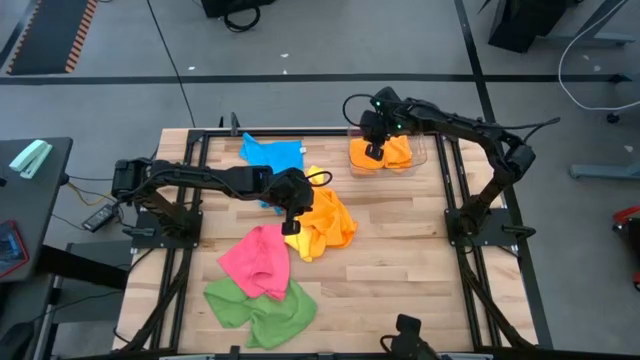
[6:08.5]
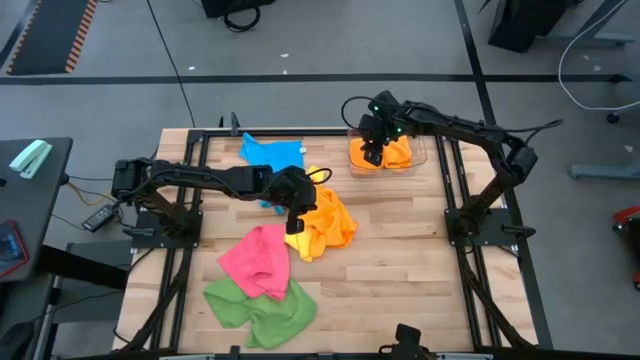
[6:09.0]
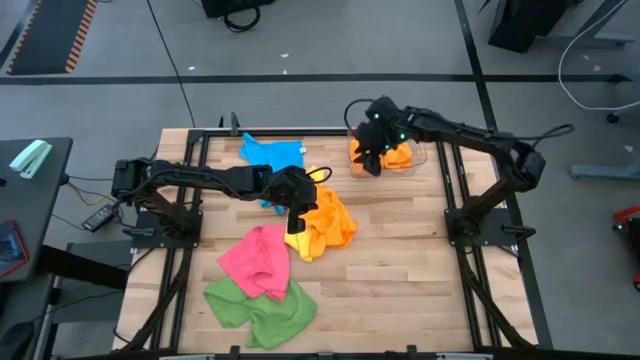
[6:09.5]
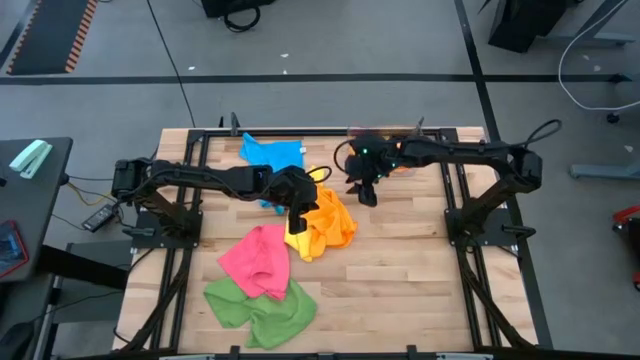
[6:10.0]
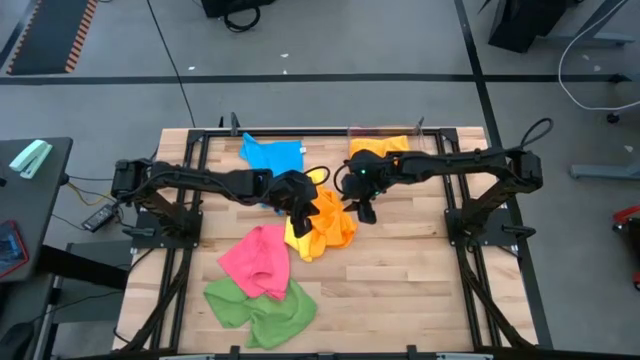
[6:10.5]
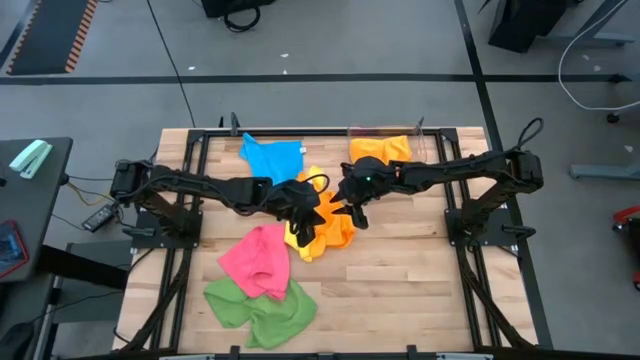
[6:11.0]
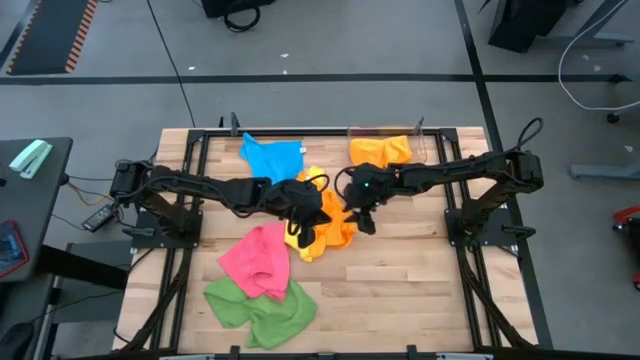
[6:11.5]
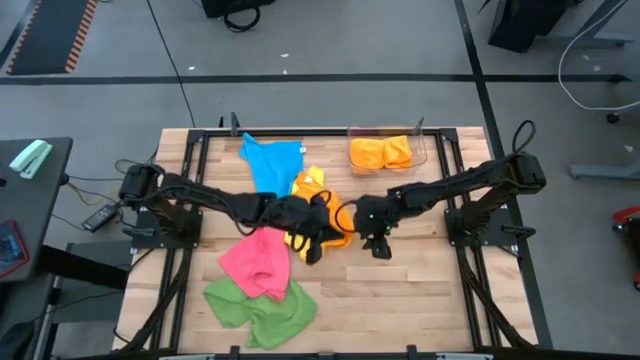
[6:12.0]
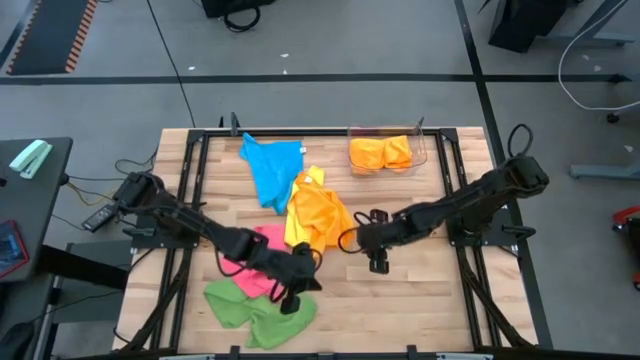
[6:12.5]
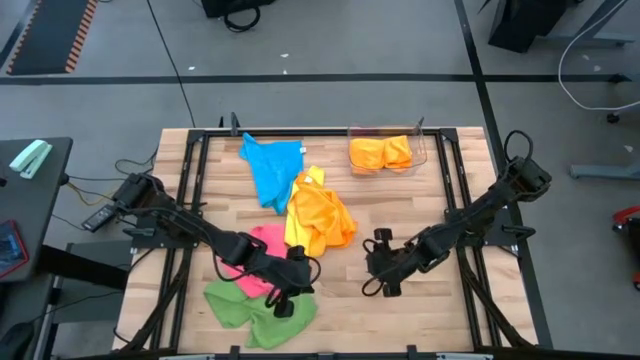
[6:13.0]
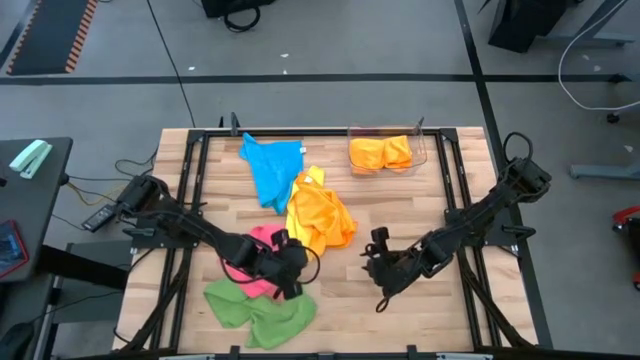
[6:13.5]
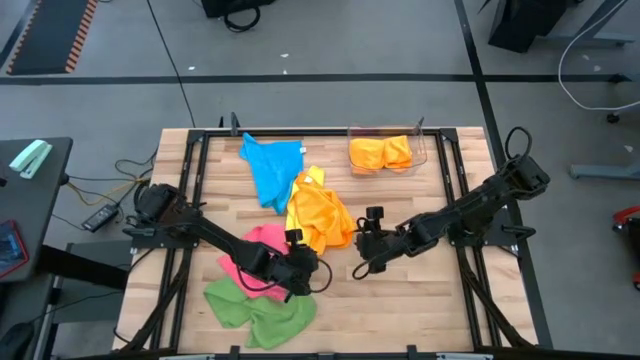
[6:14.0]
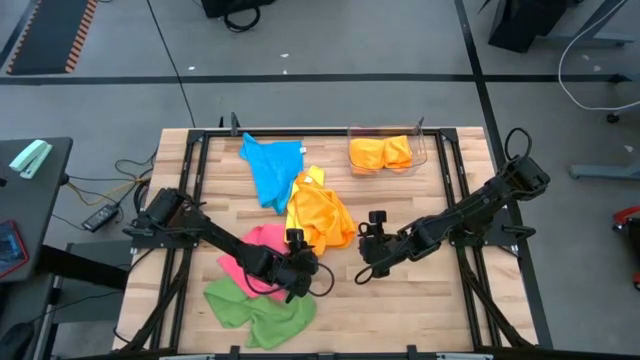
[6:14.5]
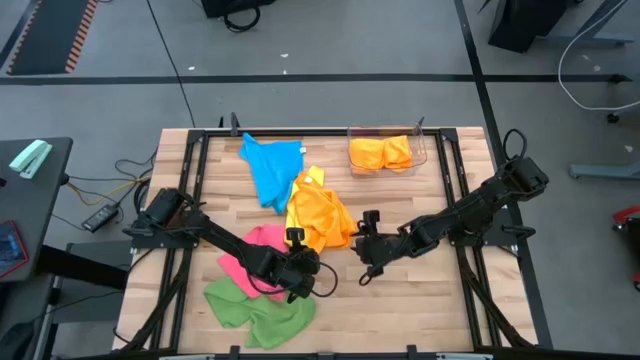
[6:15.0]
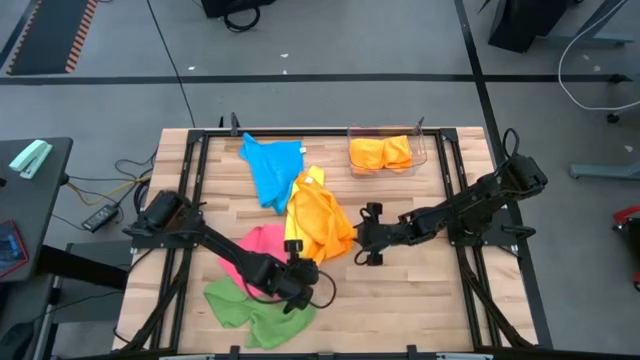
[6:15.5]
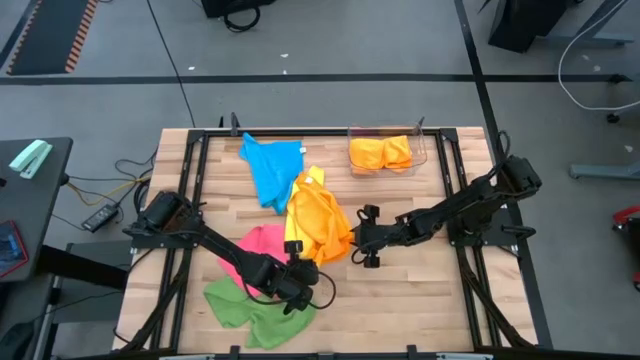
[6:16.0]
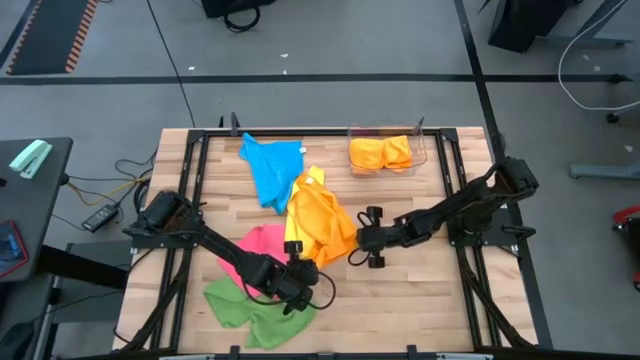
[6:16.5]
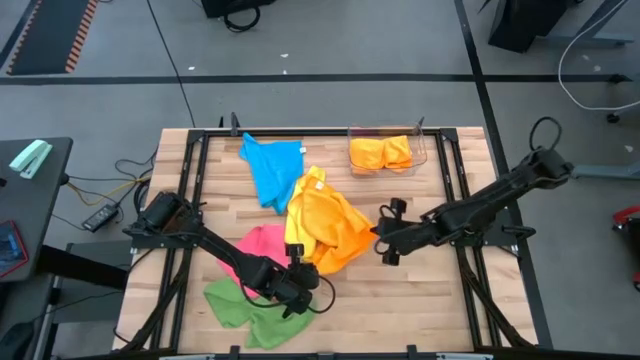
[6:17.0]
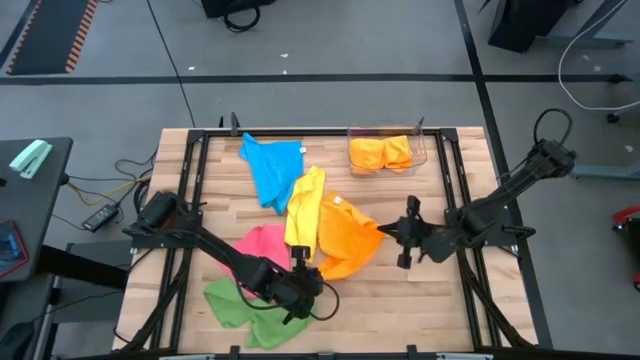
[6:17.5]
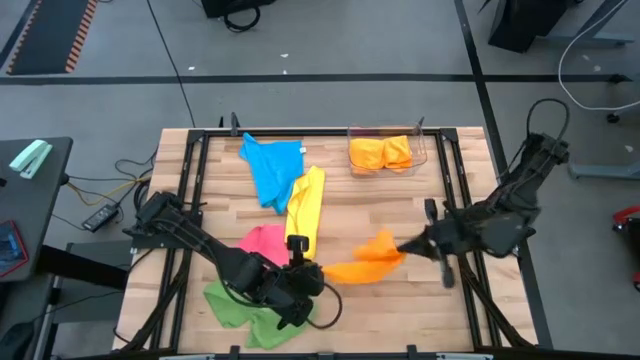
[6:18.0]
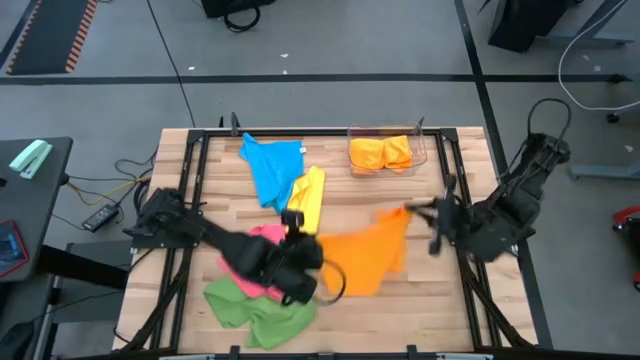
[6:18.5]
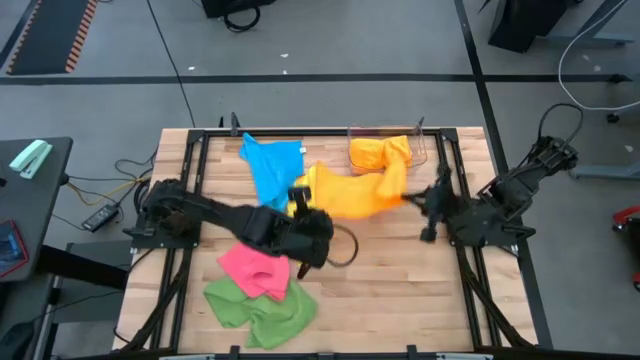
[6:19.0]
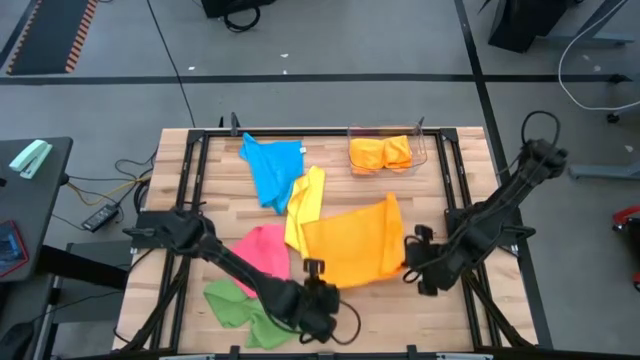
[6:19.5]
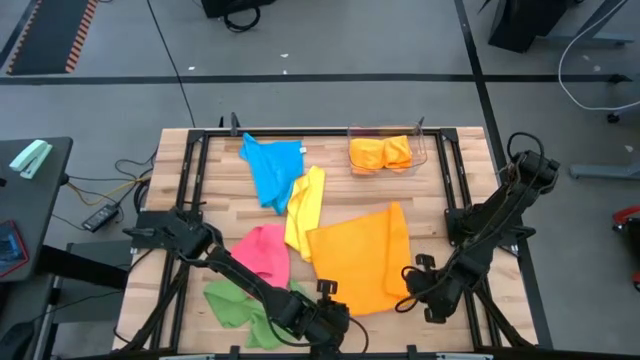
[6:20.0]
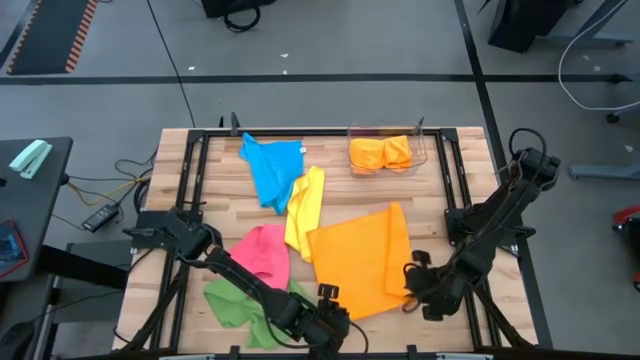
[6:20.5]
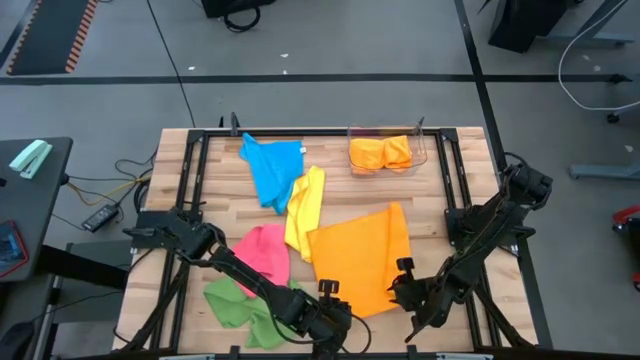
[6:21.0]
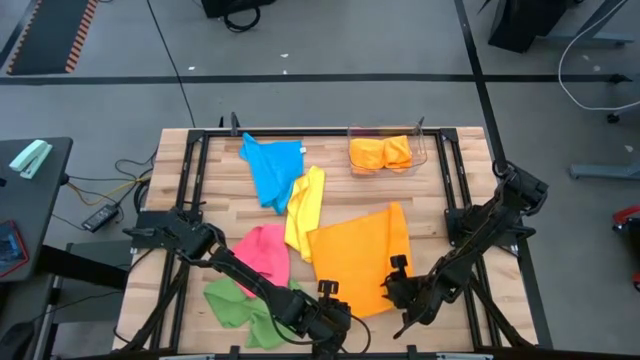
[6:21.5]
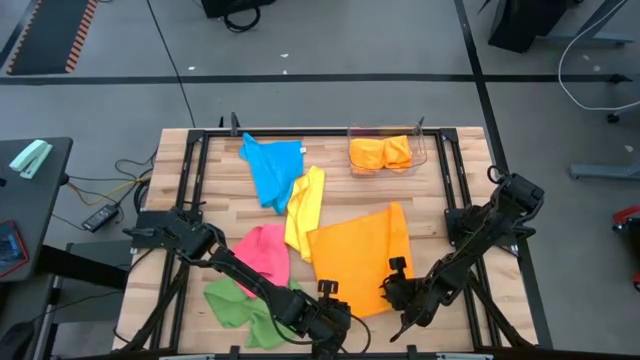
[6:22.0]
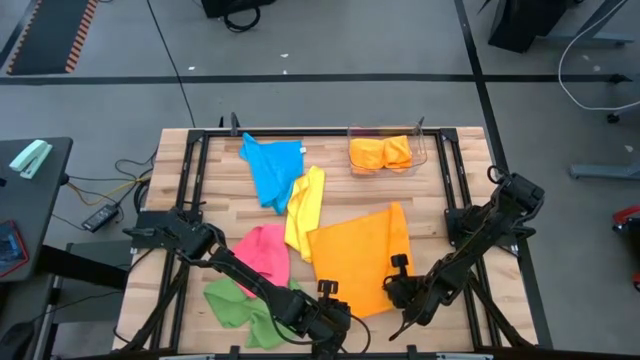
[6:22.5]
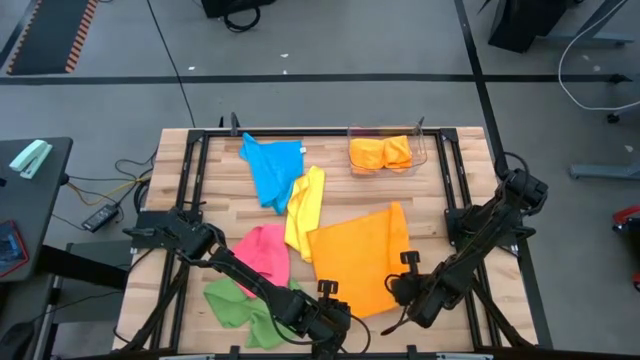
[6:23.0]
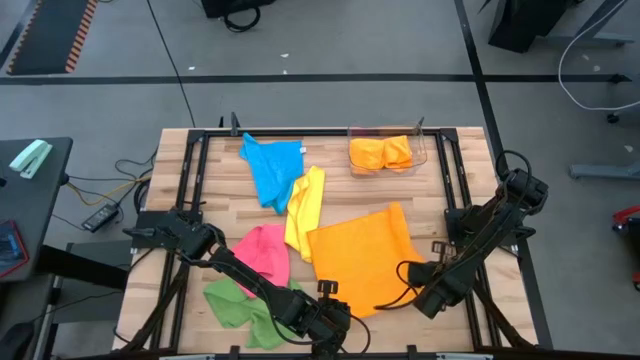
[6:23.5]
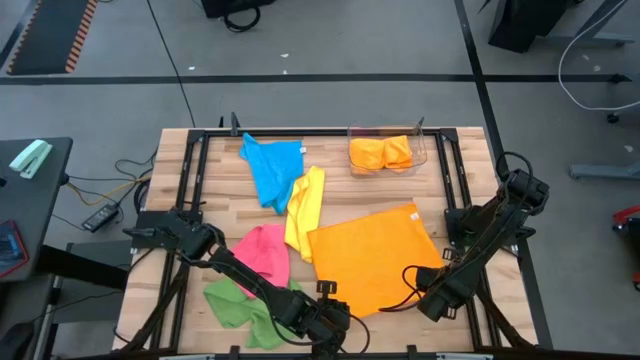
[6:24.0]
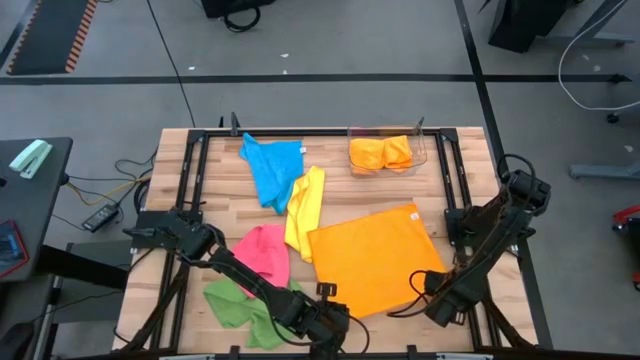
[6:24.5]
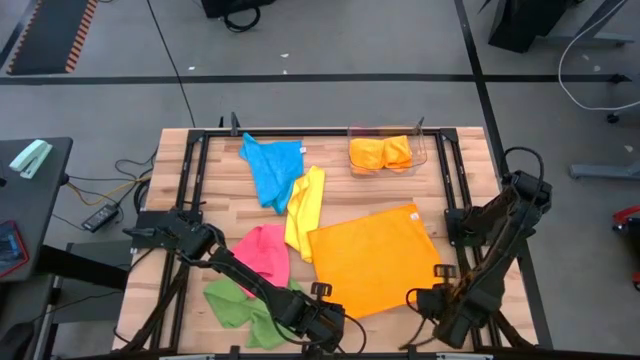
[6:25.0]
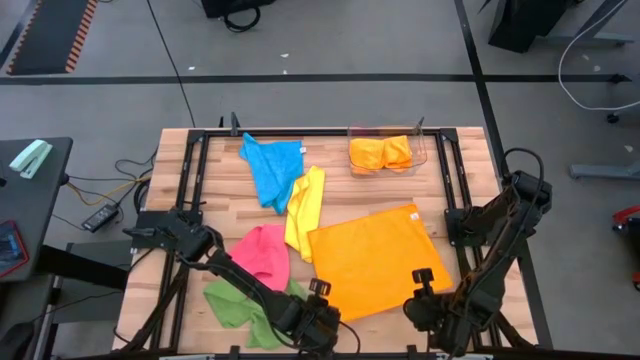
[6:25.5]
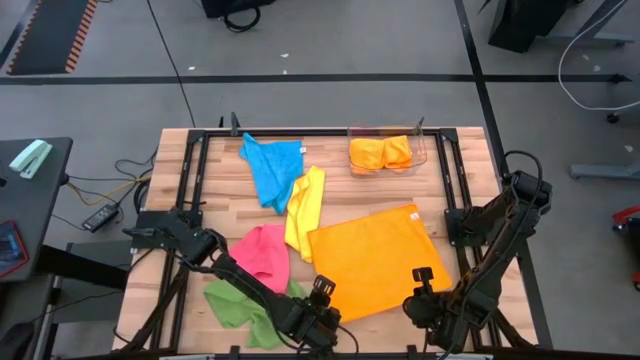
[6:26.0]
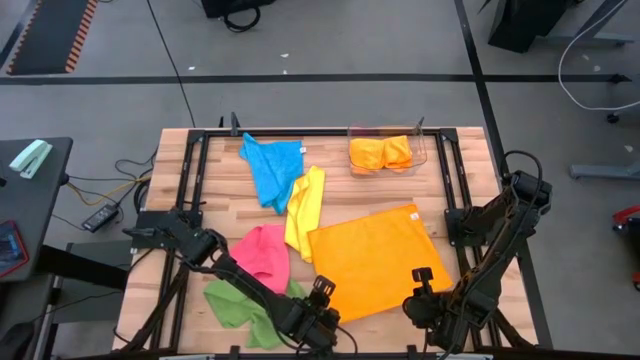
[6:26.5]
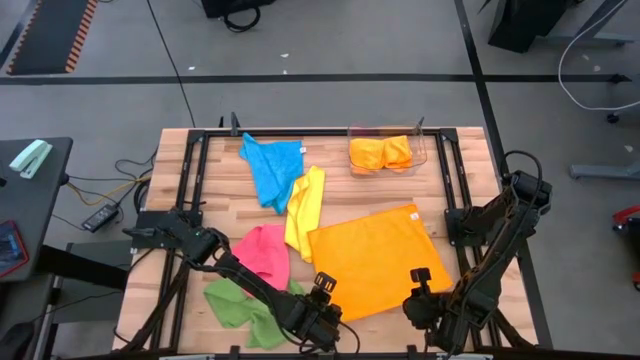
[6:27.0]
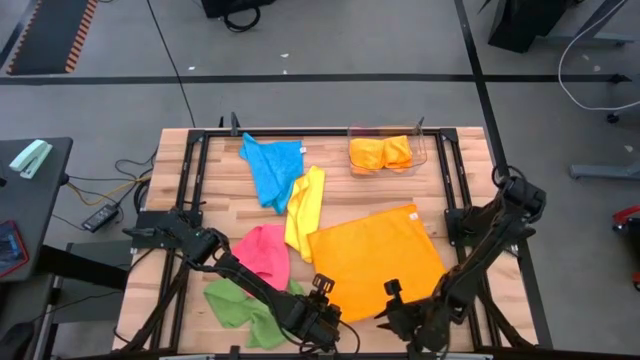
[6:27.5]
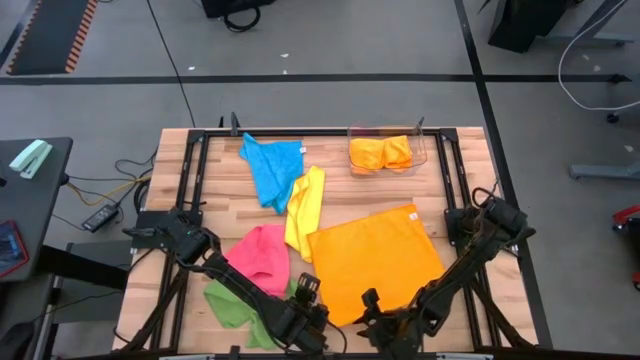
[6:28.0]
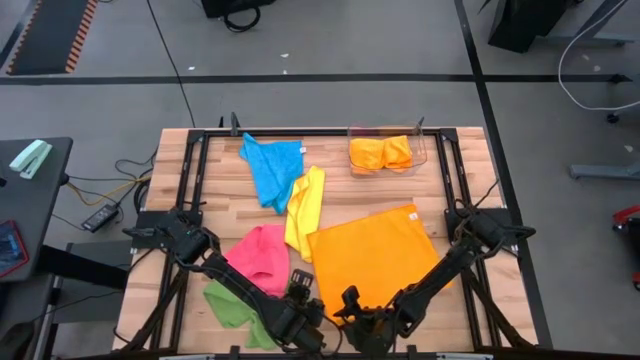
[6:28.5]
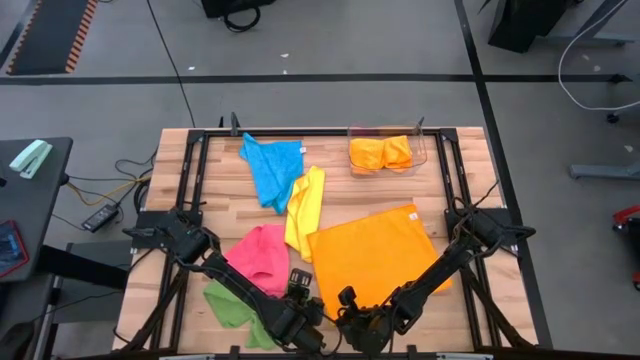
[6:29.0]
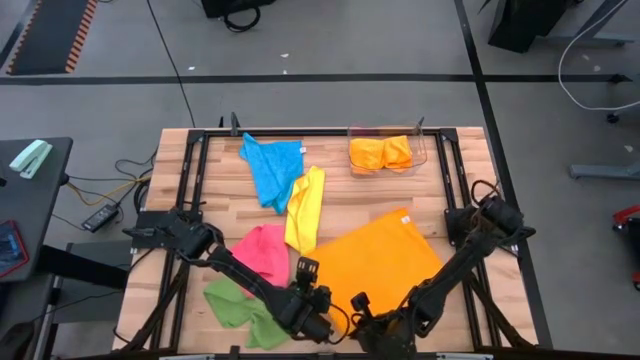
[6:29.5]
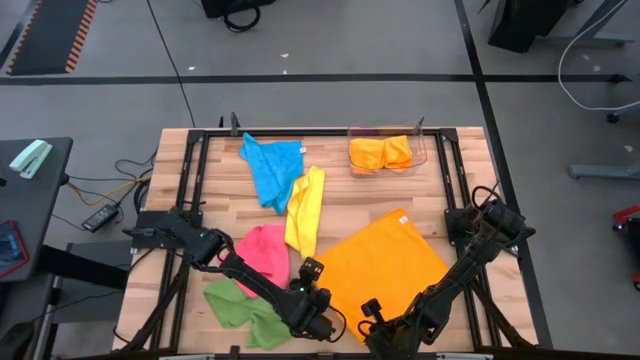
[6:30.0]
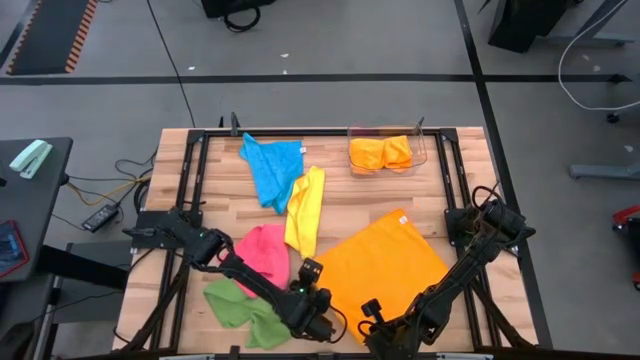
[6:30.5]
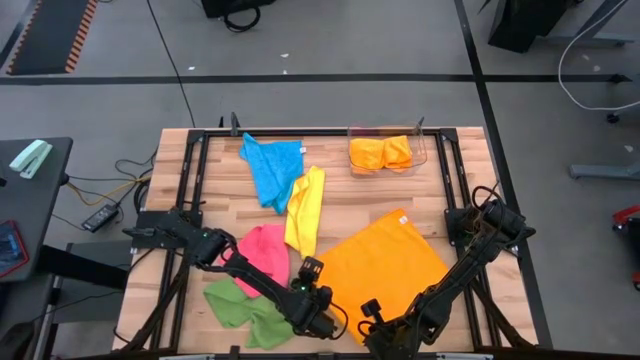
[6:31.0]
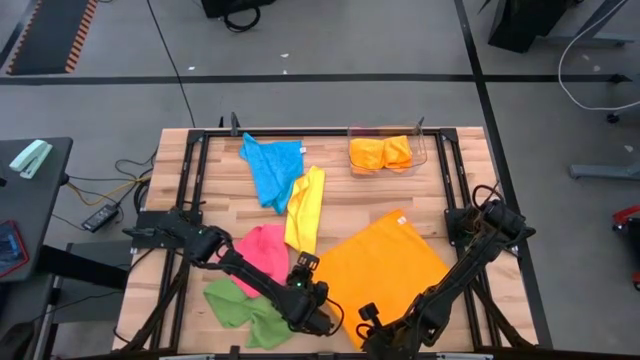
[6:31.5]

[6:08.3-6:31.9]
Task: Fold microfiber towels
Fold the orange microfiber cloth
